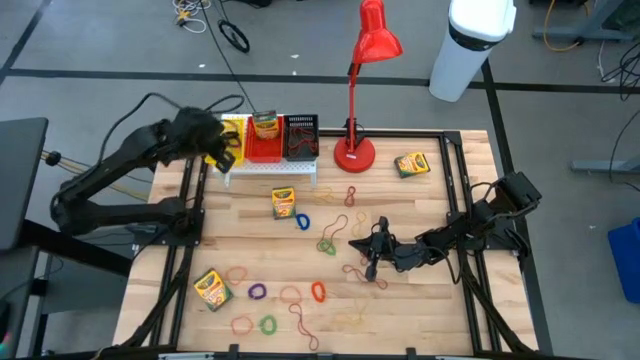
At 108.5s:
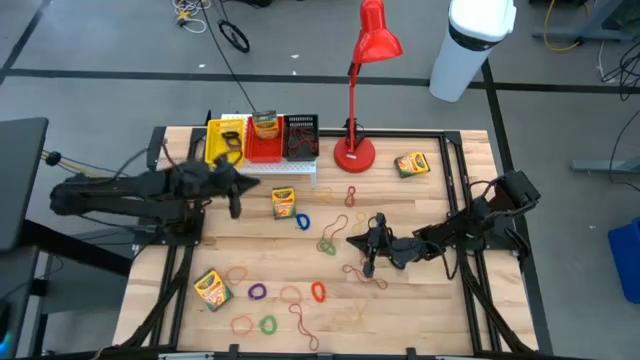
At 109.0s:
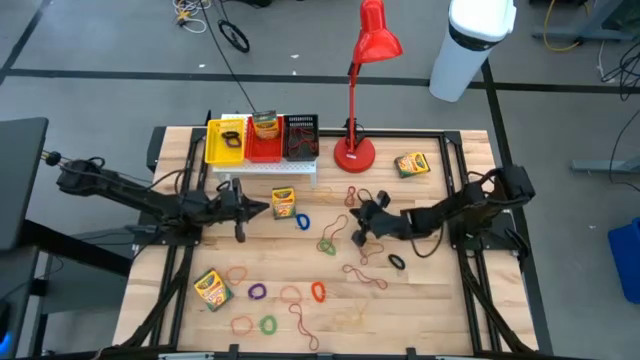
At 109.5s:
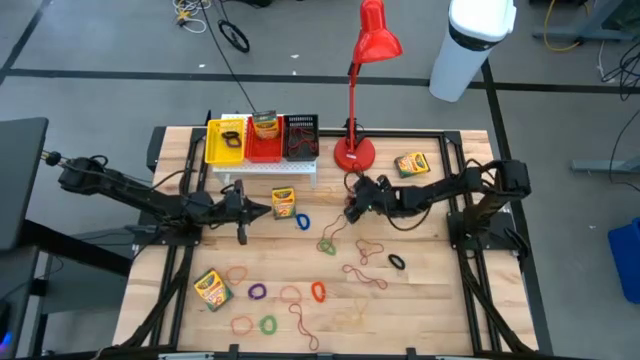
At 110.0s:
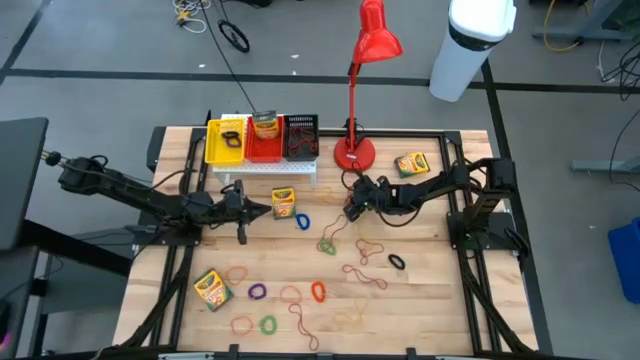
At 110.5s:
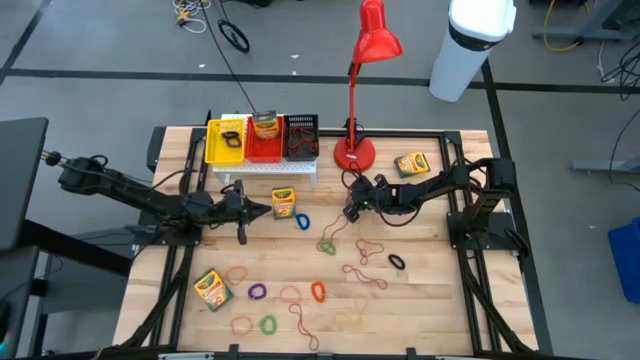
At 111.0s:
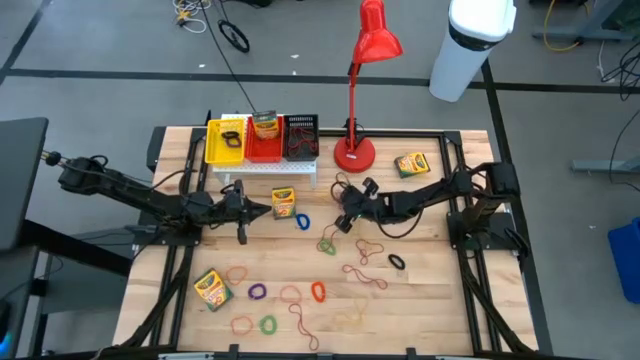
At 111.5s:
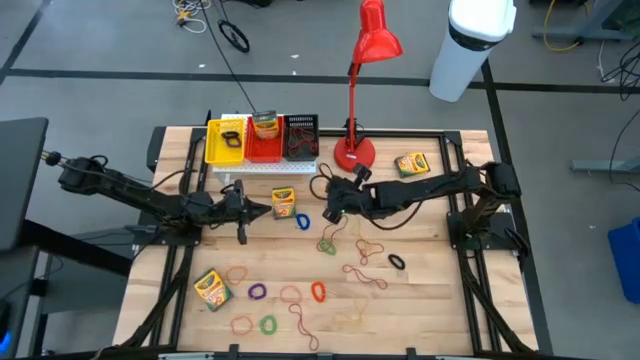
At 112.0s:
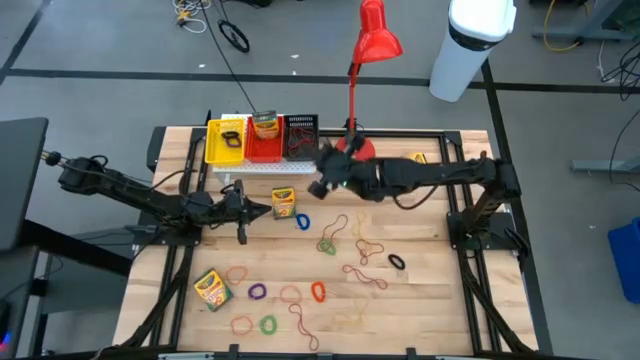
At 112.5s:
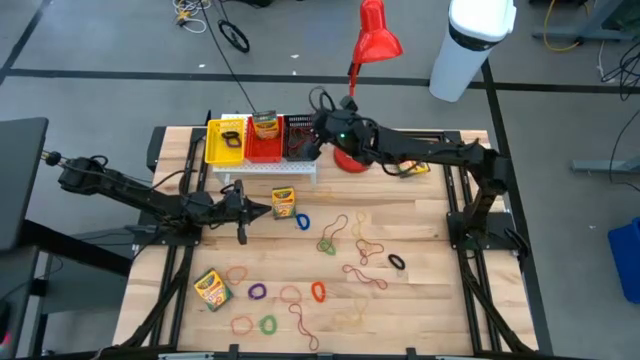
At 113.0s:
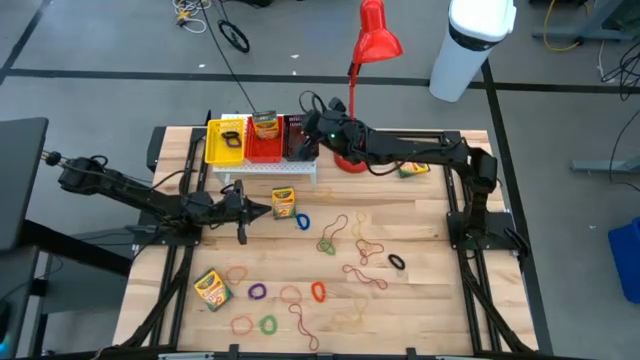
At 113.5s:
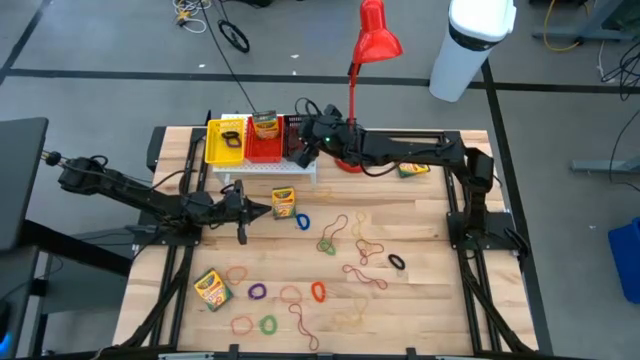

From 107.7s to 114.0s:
Task: Pick & Place Office Desk Supplies
Put the red rubber band into the black bin on the shelf

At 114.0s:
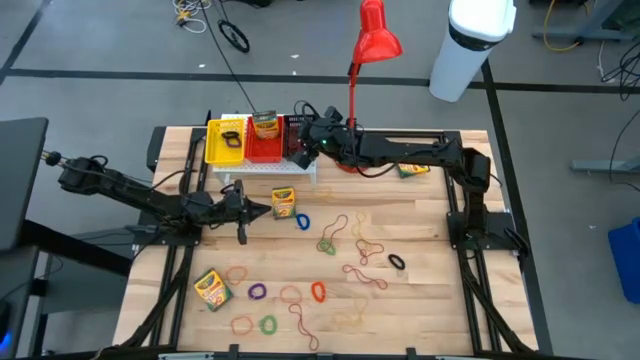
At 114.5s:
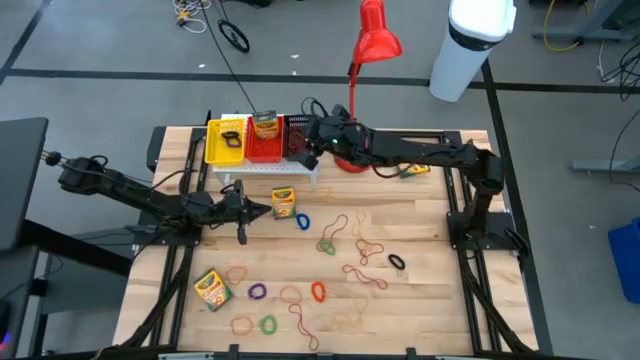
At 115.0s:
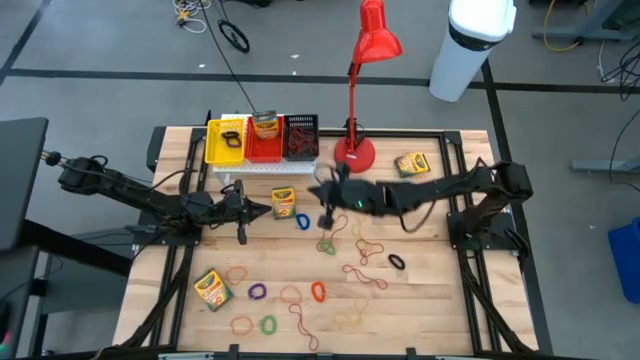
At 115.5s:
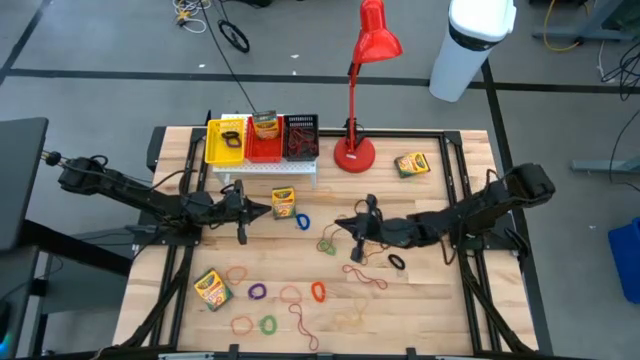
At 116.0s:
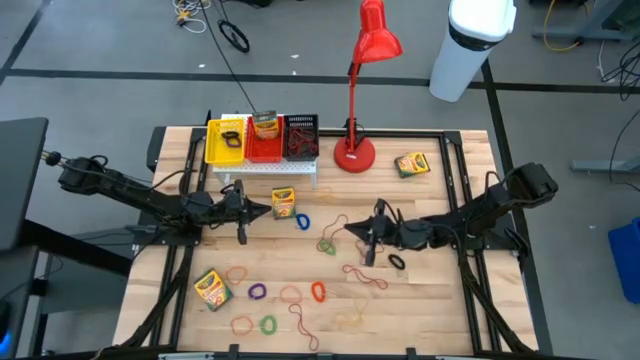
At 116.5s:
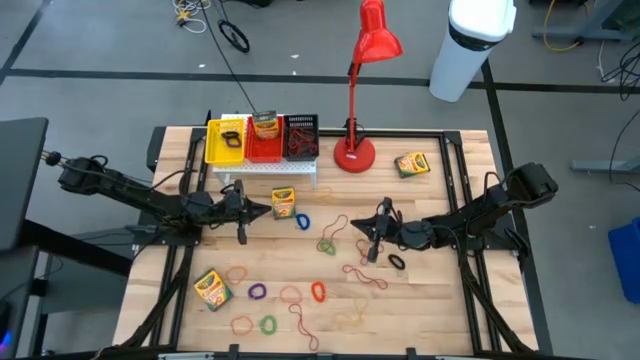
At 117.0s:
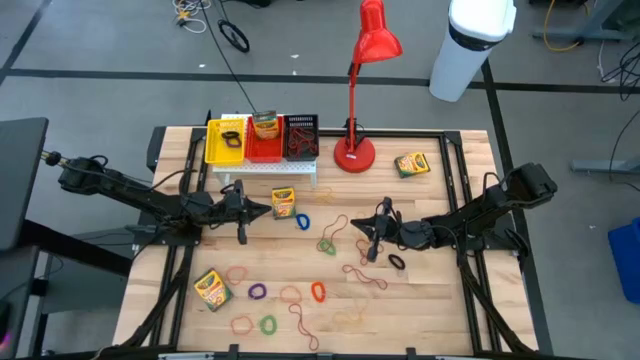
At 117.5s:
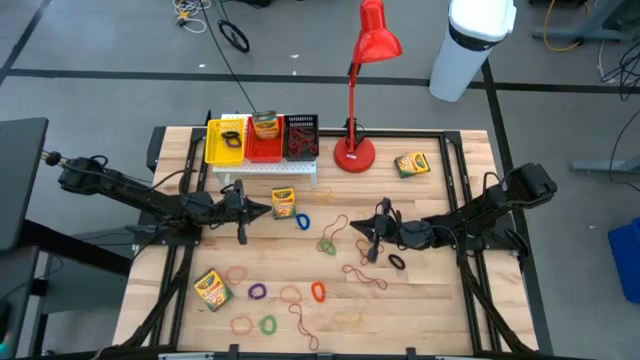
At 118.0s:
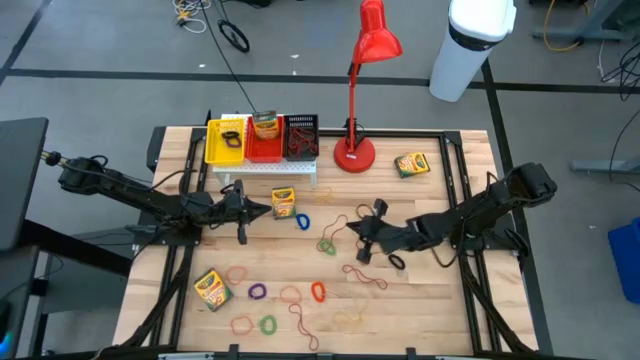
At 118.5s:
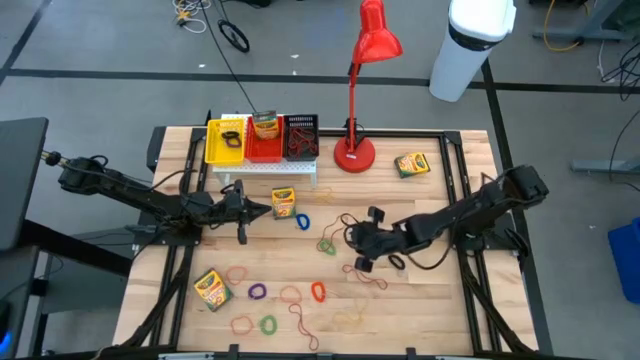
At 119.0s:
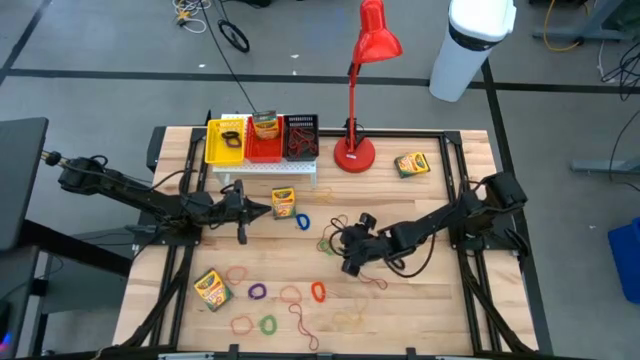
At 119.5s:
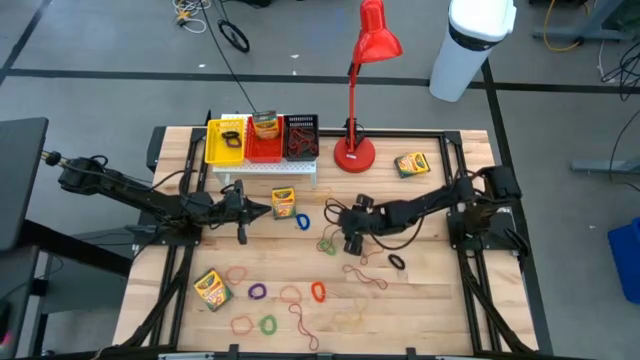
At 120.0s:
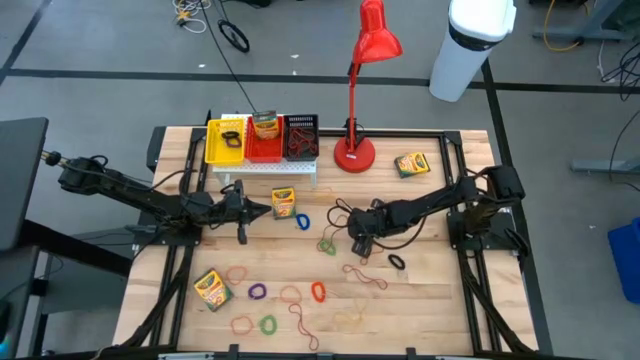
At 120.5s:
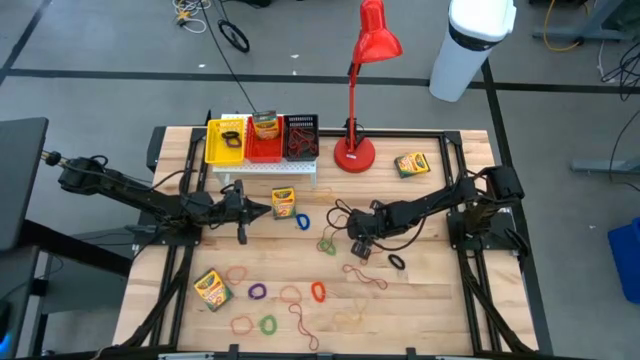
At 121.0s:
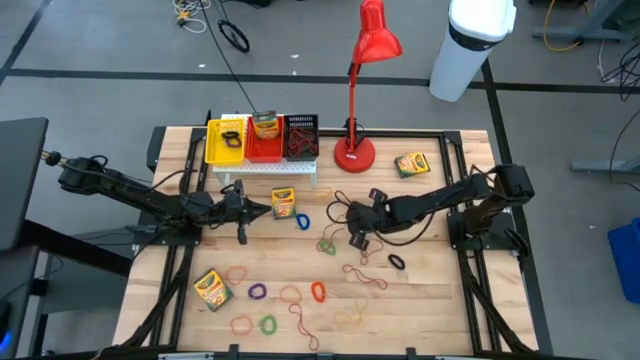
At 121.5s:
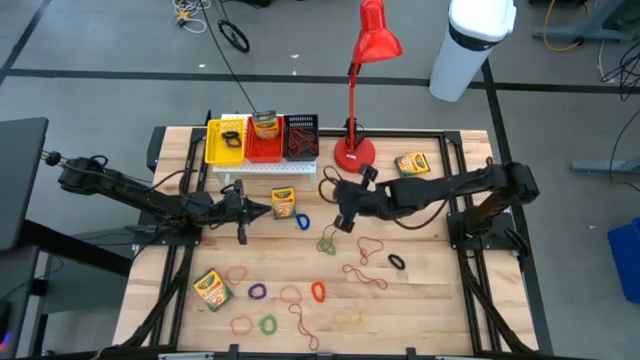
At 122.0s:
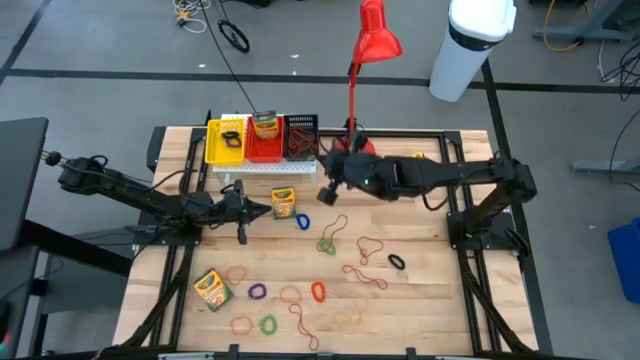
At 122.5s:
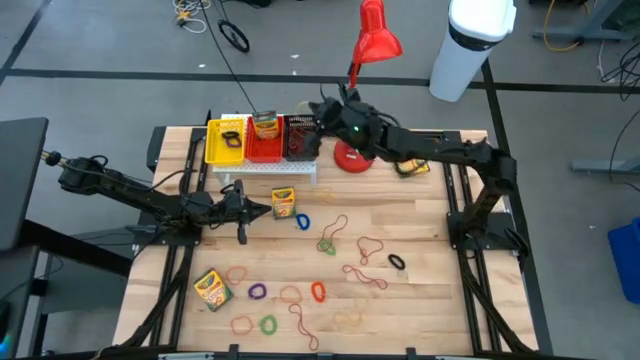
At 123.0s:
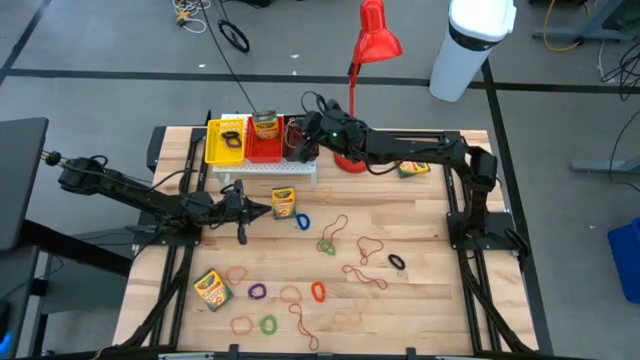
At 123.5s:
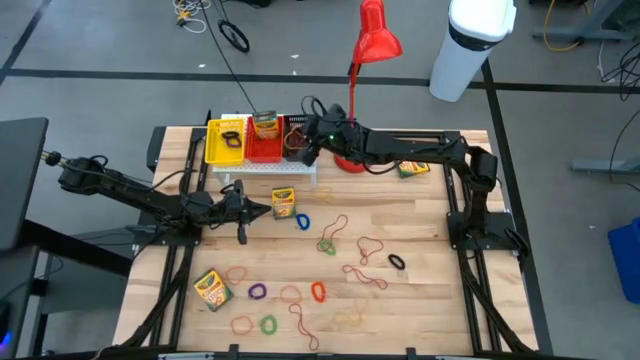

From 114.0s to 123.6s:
Put the yellow rubber band into the black bin on the shelf

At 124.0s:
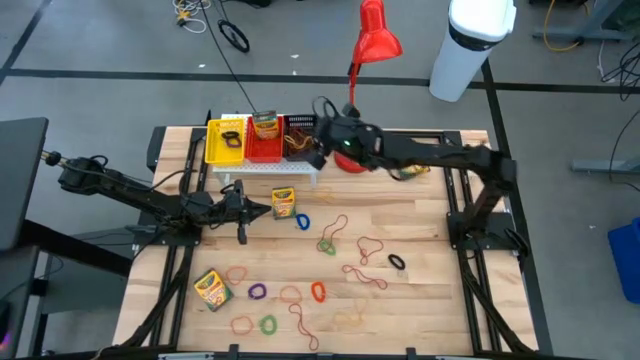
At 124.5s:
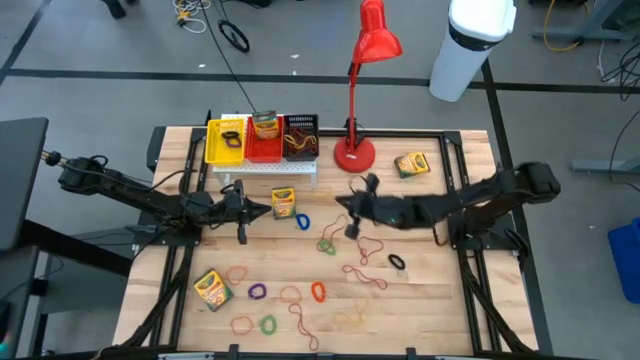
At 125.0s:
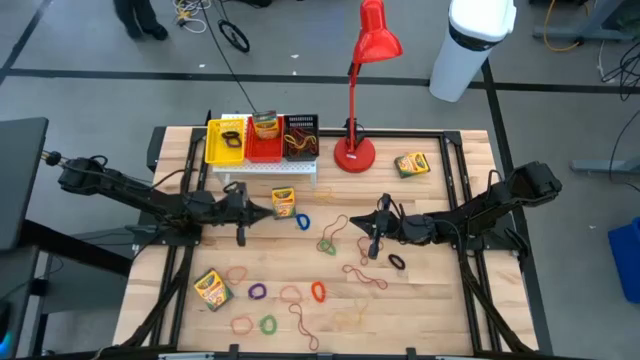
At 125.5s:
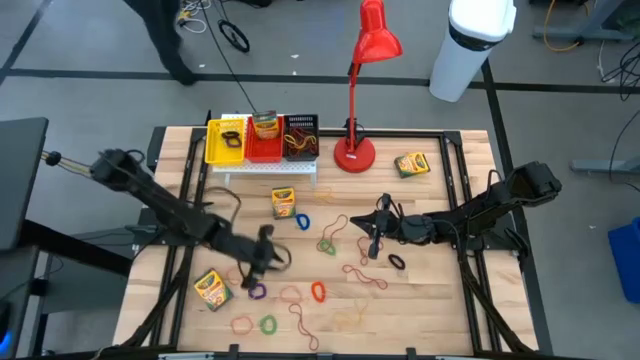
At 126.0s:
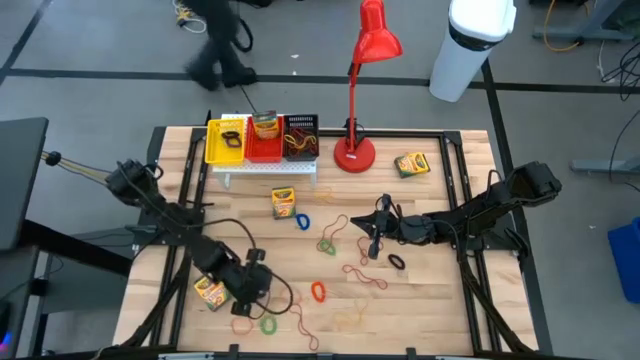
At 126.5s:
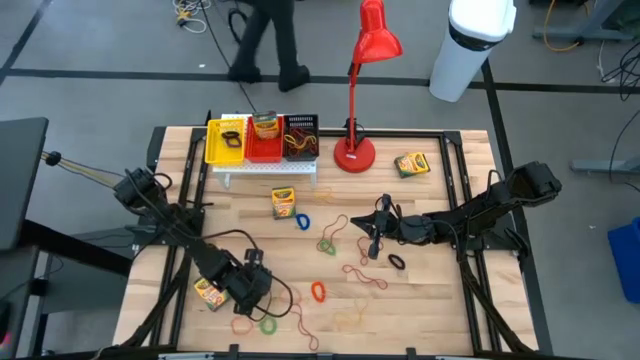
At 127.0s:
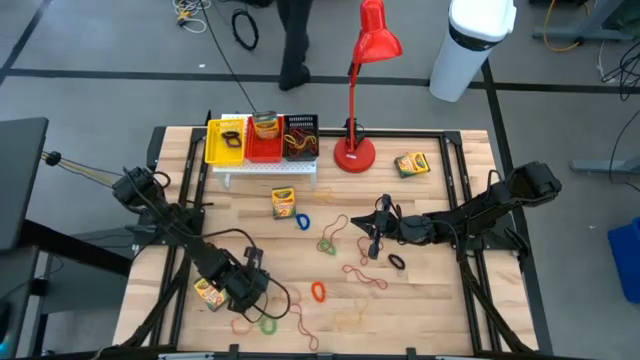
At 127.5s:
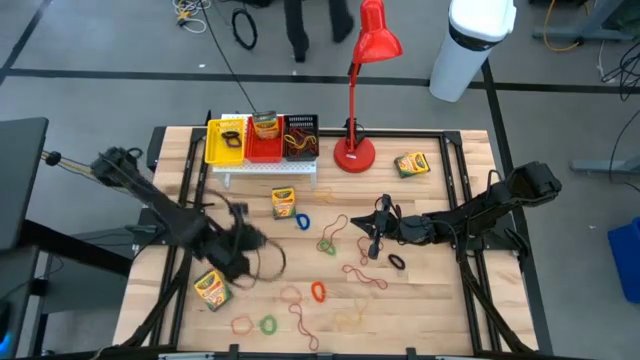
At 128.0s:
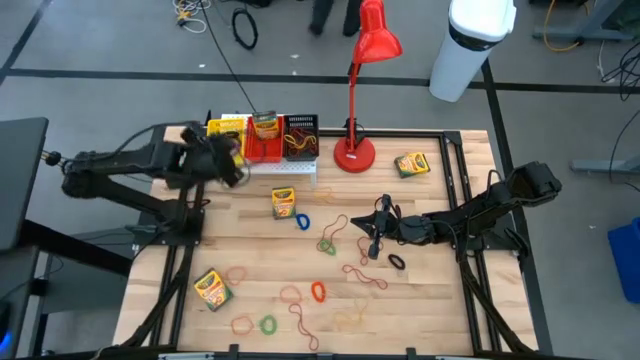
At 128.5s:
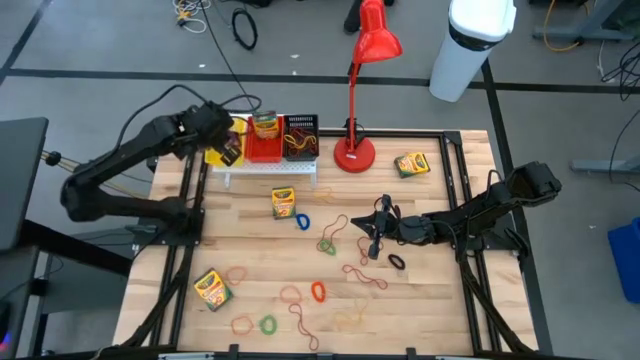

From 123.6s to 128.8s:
Put the violet spring rubber band into the yellow bin on the shelf
